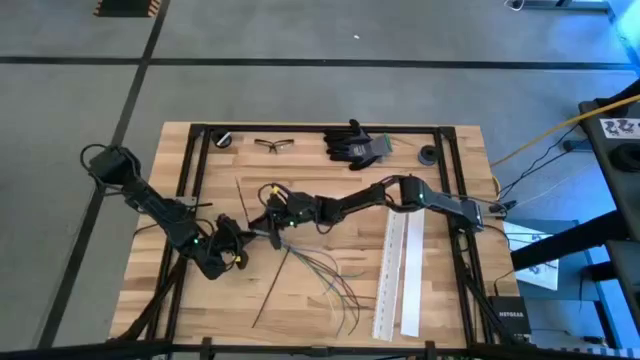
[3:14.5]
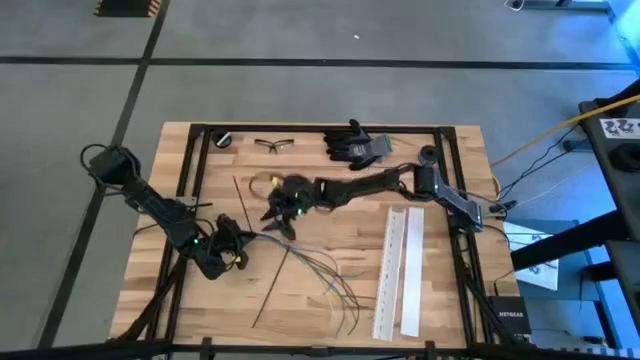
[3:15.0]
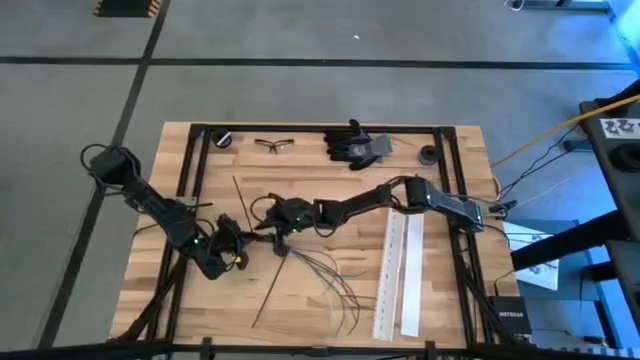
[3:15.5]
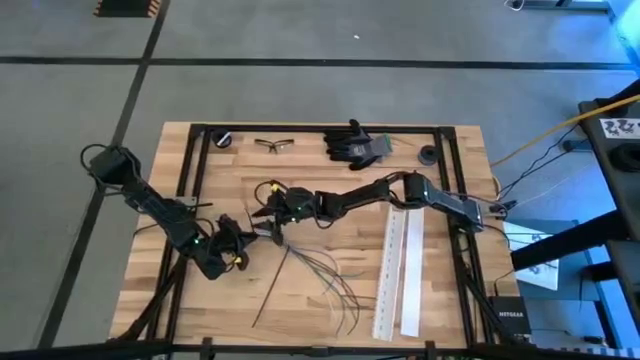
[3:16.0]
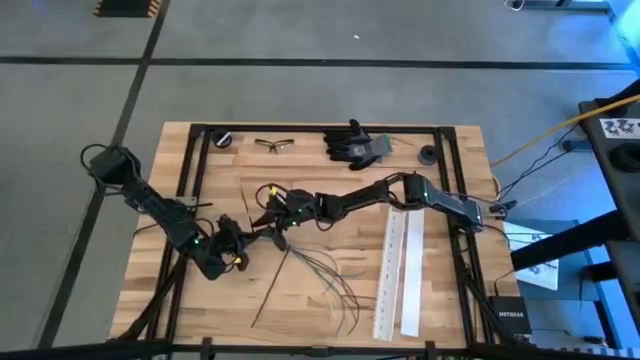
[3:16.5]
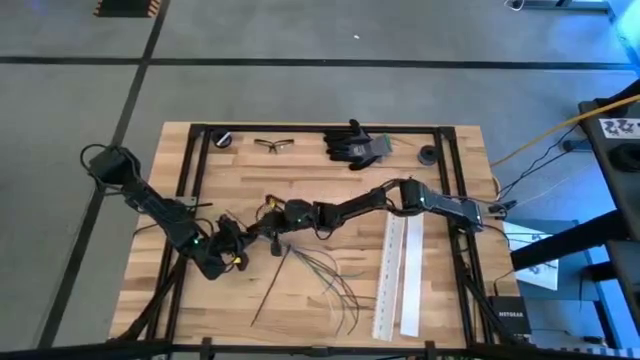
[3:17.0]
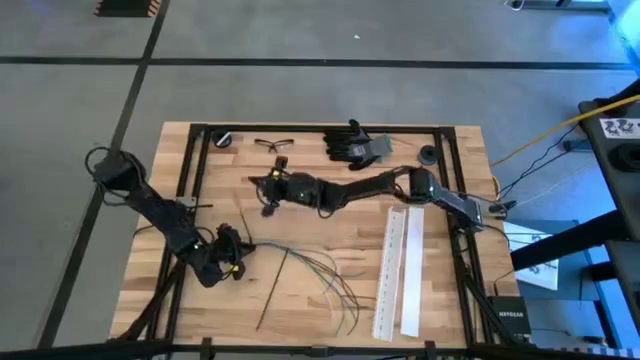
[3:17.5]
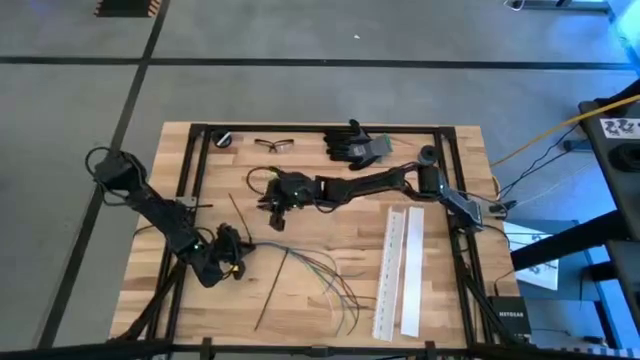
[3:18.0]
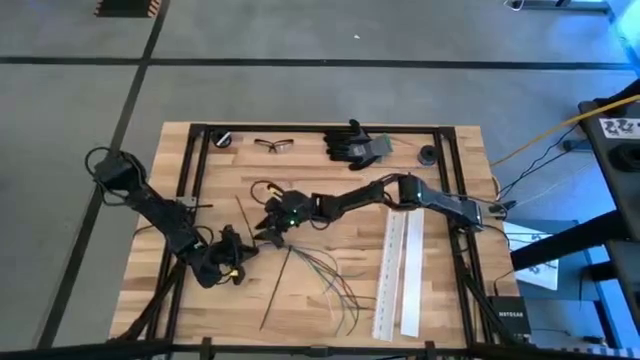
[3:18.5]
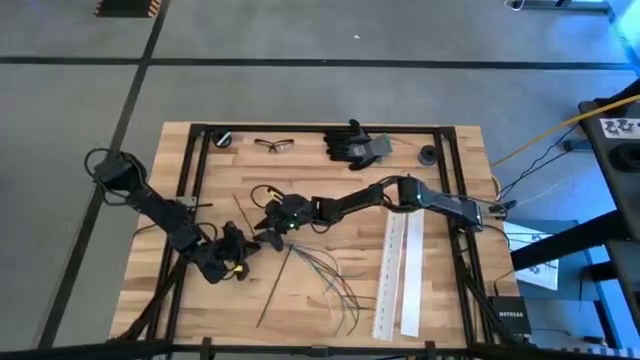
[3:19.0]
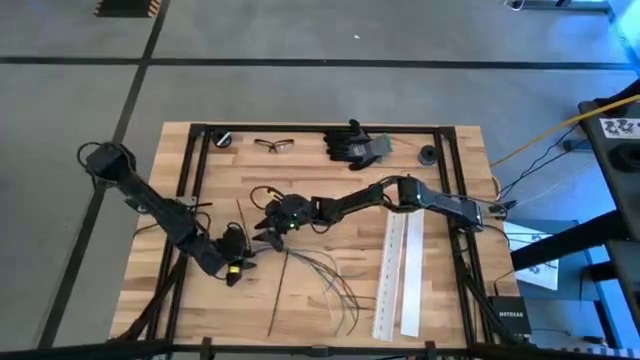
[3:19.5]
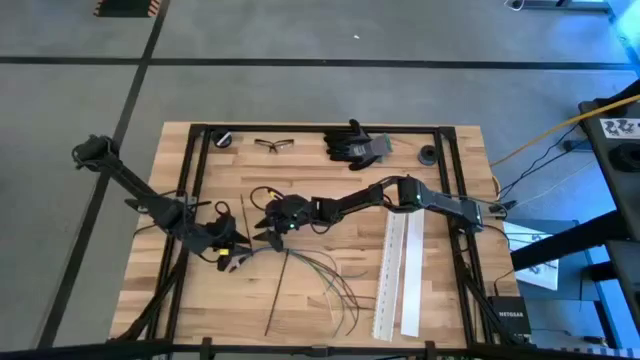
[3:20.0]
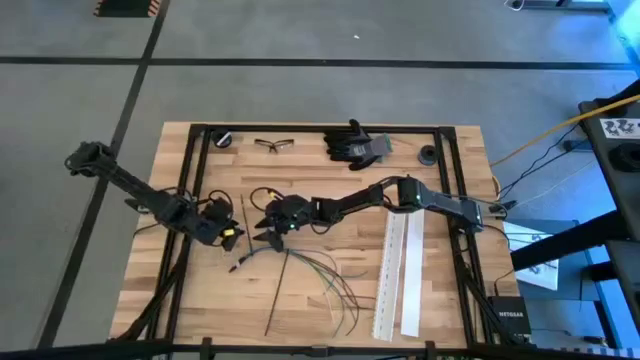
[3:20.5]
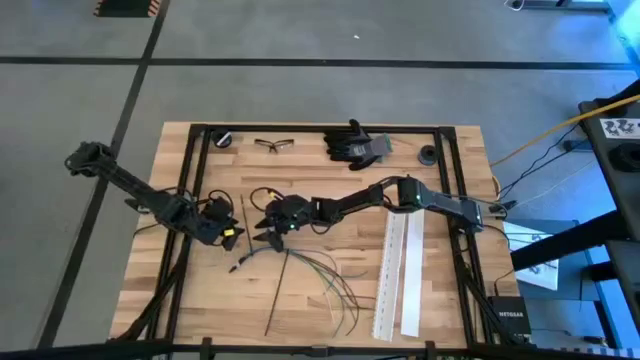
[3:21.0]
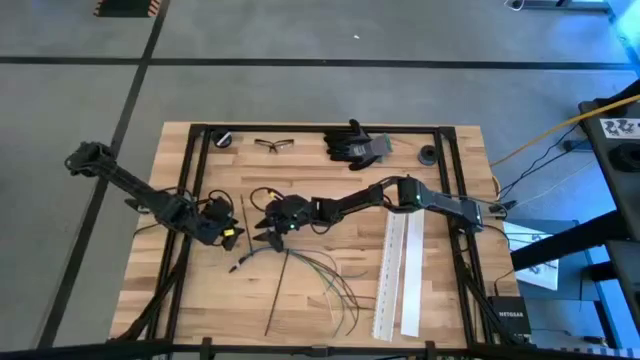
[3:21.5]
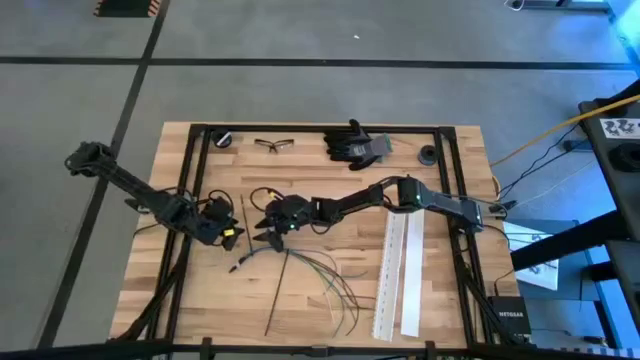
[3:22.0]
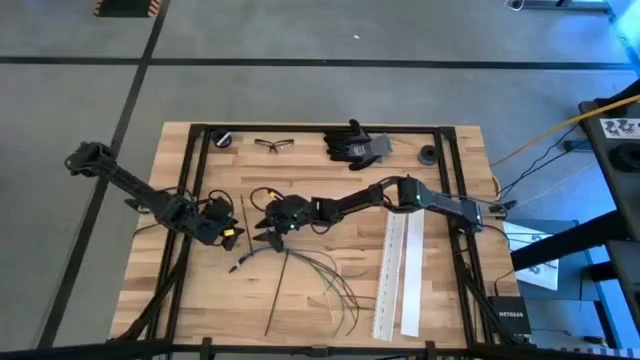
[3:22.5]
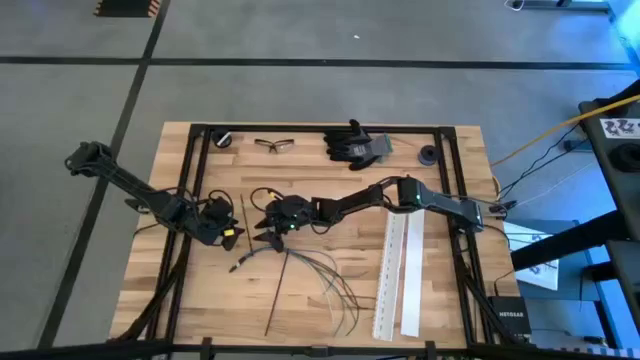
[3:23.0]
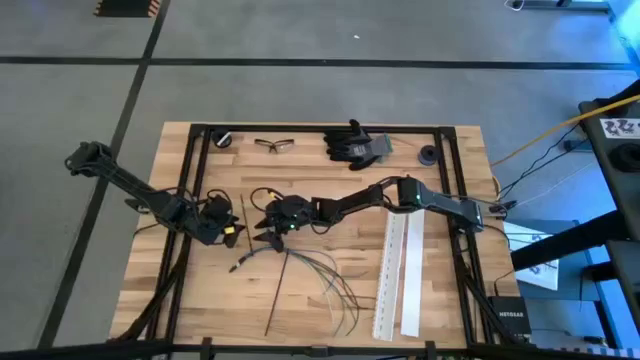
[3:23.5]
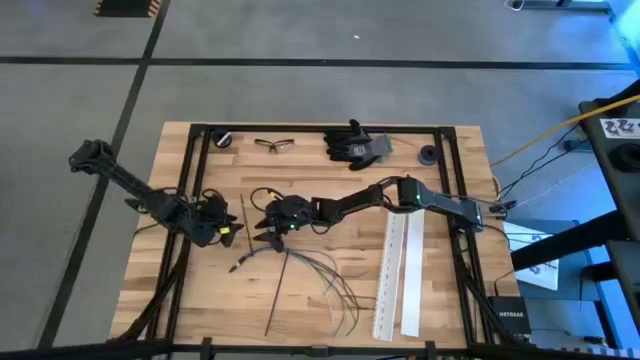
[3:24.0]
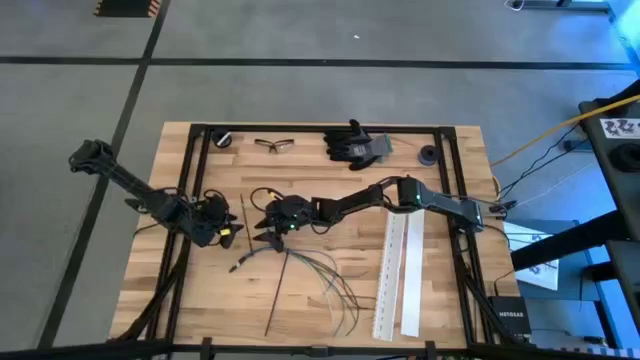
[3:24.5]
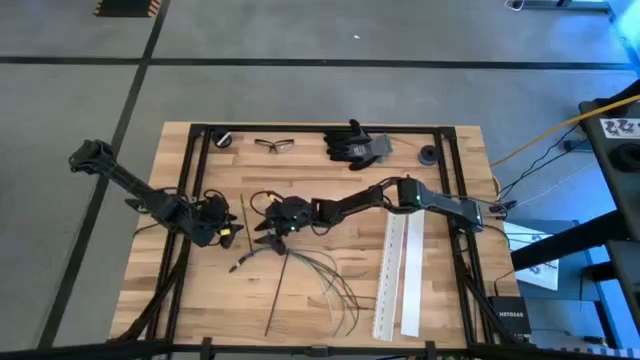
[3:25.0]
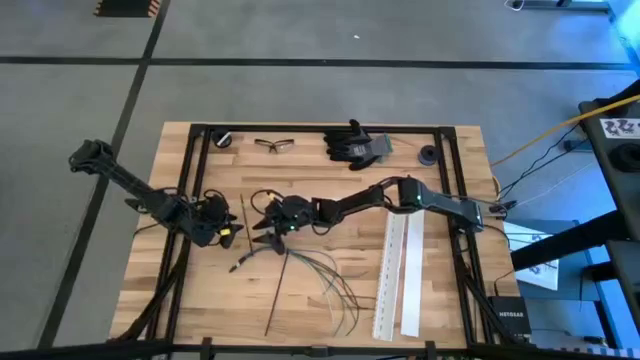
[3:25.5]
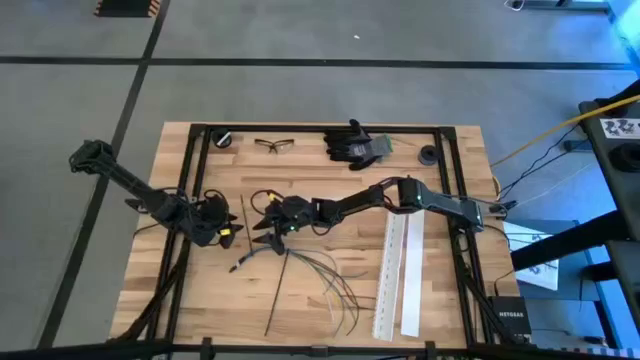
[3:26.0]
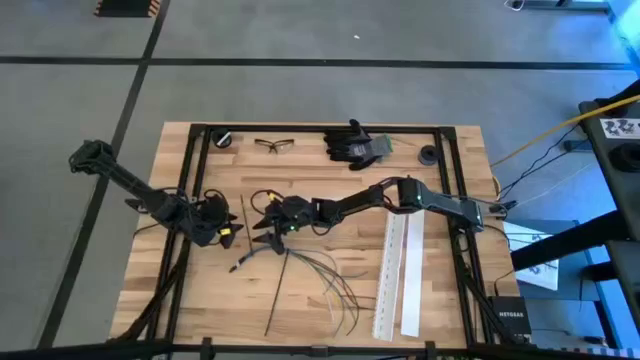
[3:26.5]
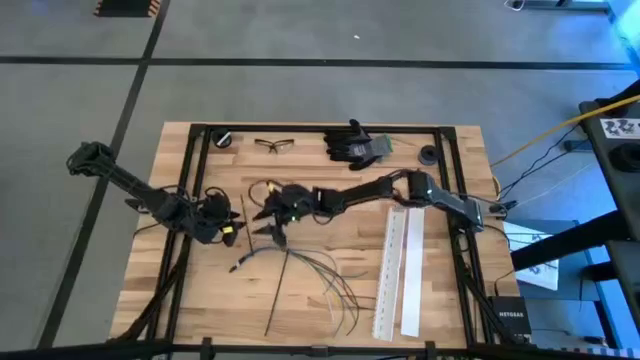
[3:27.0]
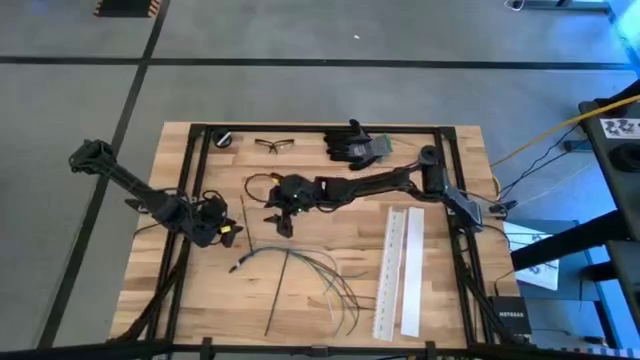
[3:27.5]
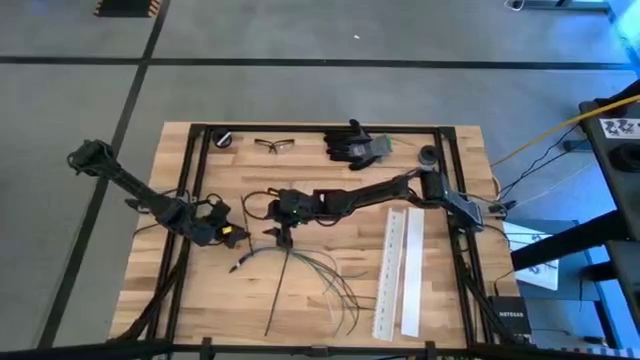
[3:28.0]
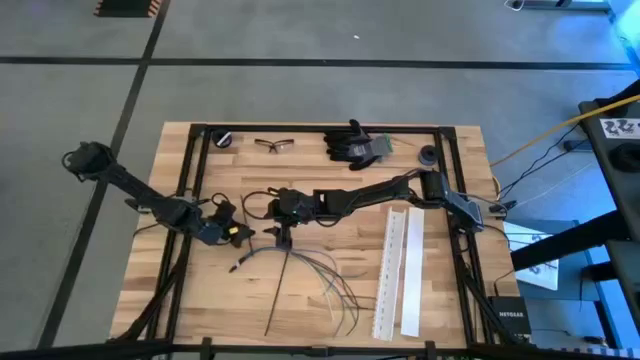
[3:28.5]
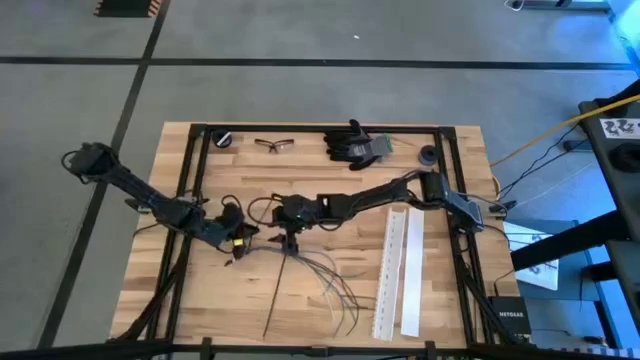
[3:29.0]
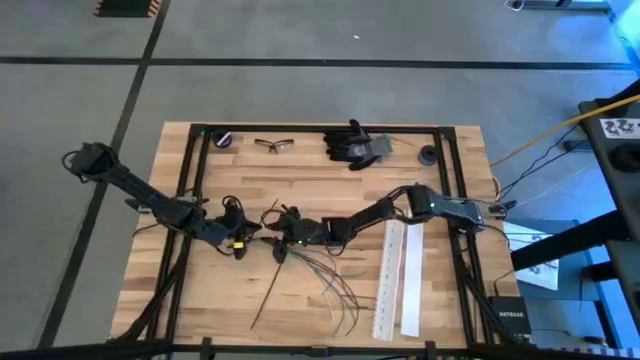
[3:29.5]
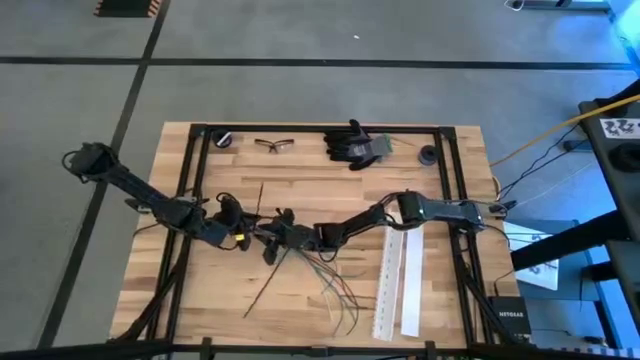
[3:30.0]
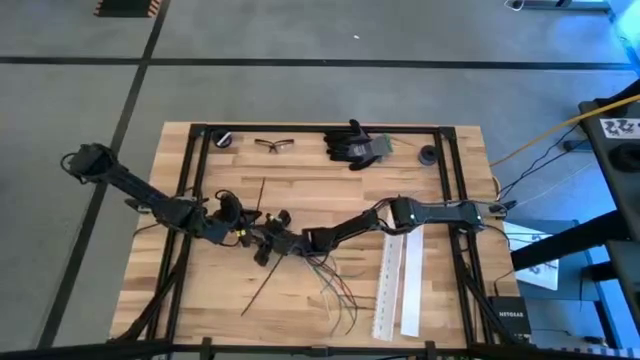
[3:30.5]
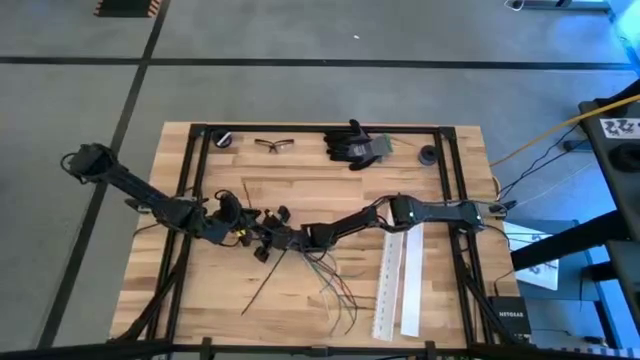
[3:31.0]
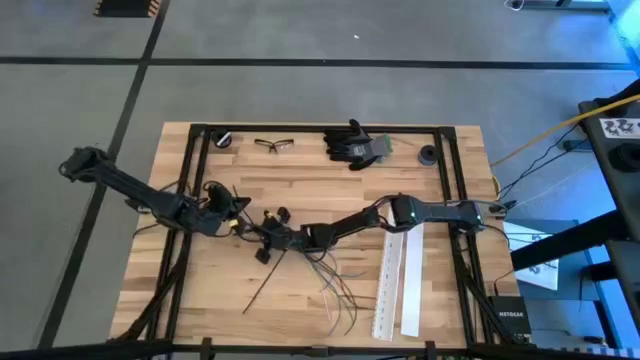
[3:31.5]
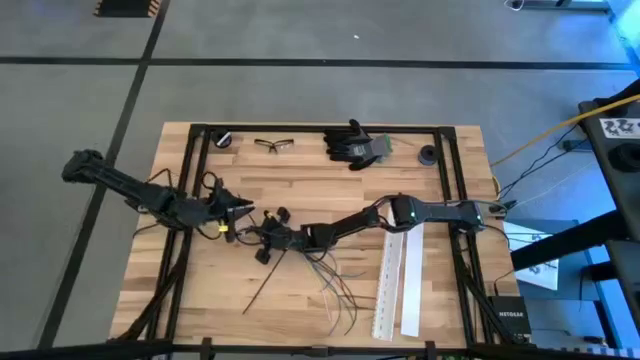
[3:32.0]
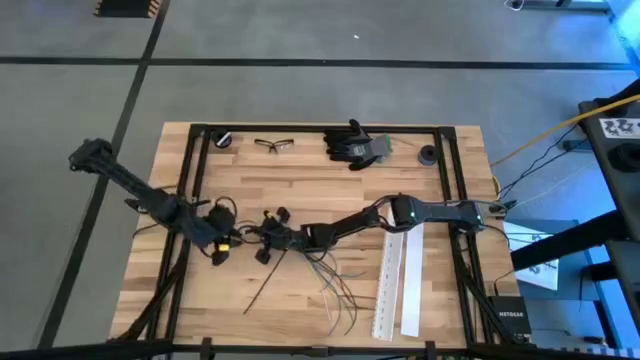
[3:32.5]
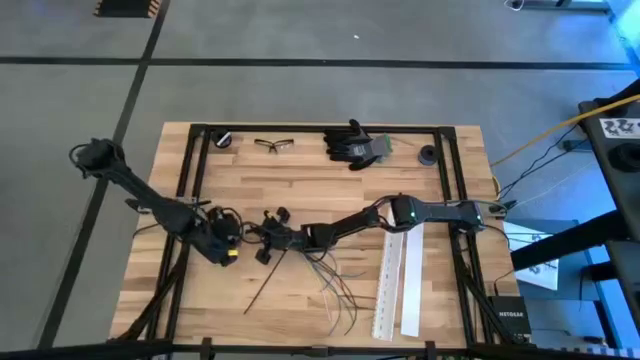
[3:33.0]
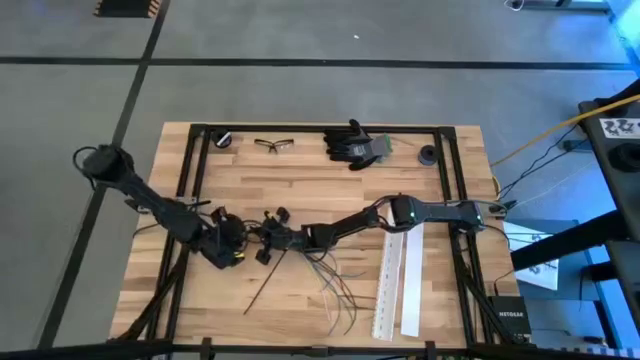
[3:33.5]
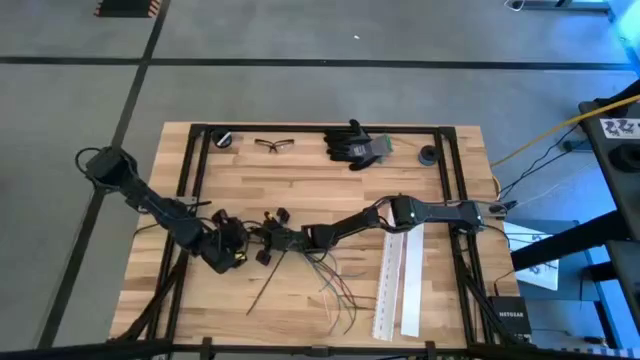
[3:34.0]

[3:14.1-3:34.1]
Task: Ziptie cables
Wrap the zip tie on the cables

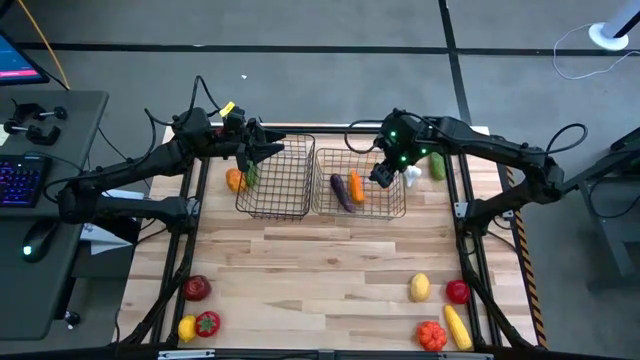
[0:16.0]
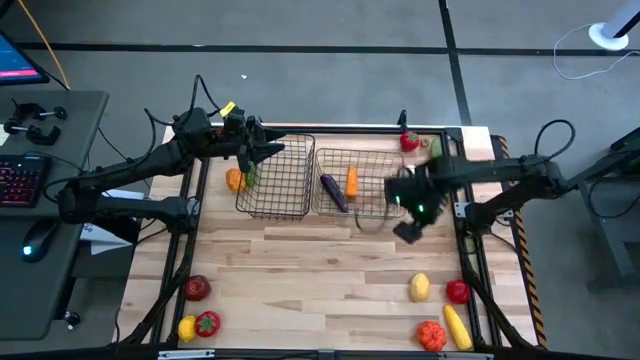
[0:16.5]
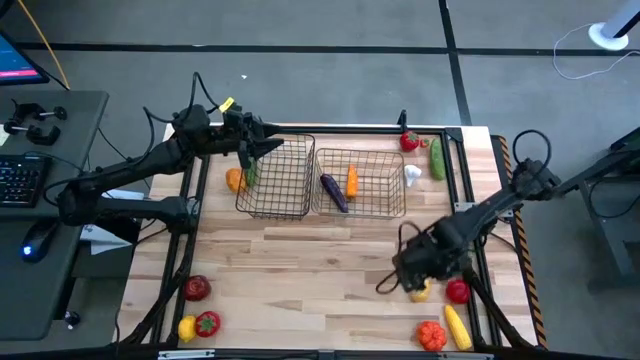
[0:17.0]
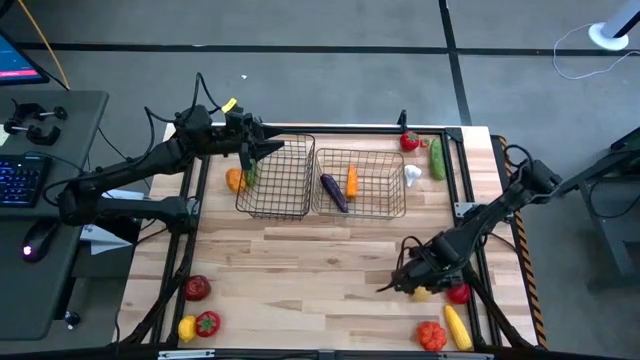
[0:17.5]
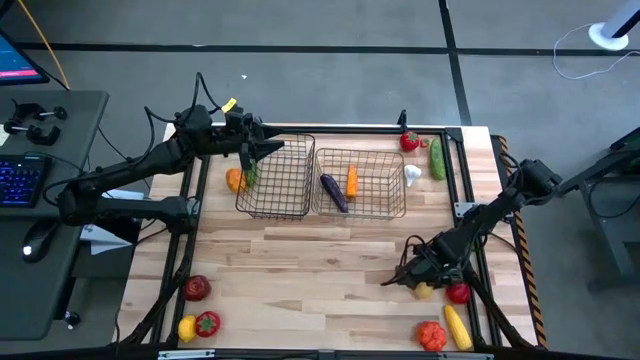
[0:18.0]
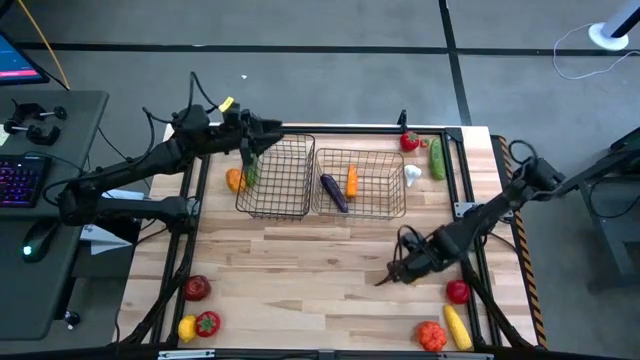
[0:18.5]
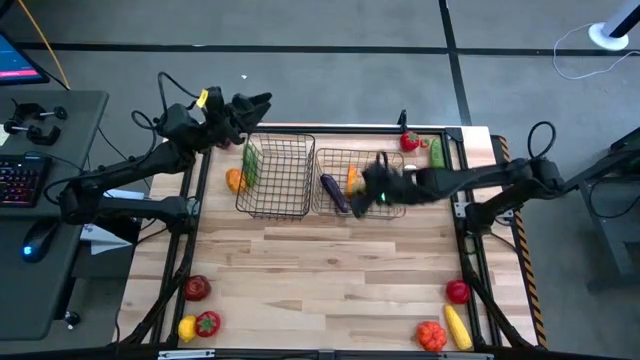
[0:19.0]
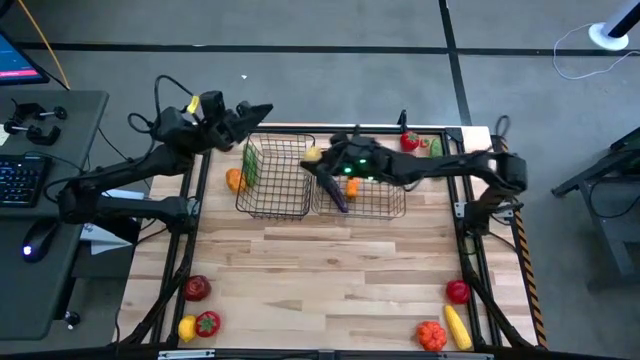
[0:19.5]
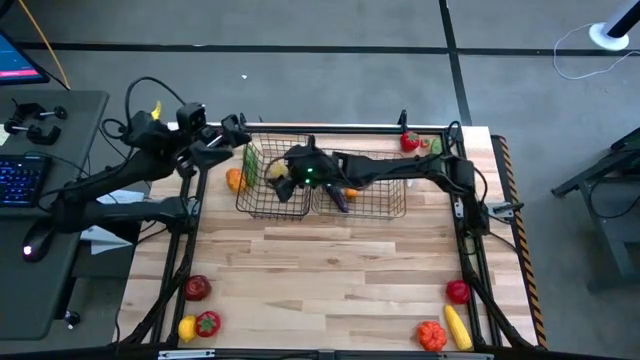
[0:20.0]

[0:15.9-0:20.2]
Task: Sort produce into baskets
Put the right lemon into the left black wire basket
